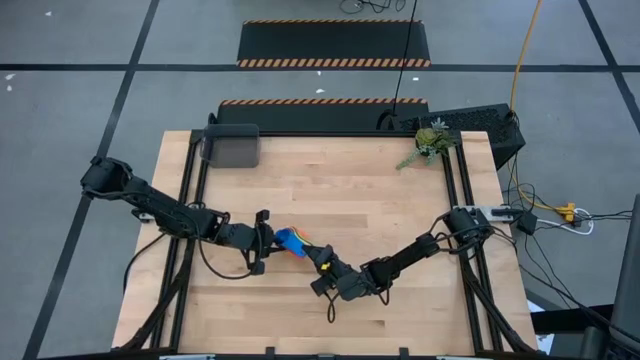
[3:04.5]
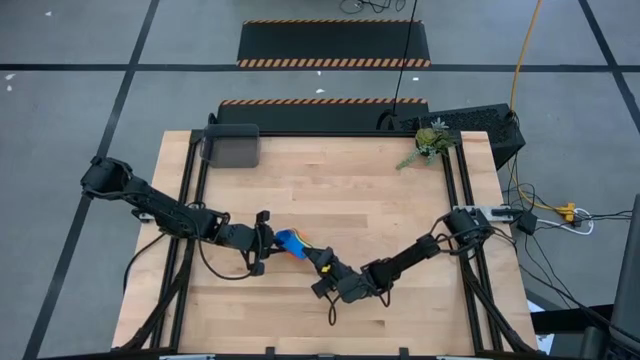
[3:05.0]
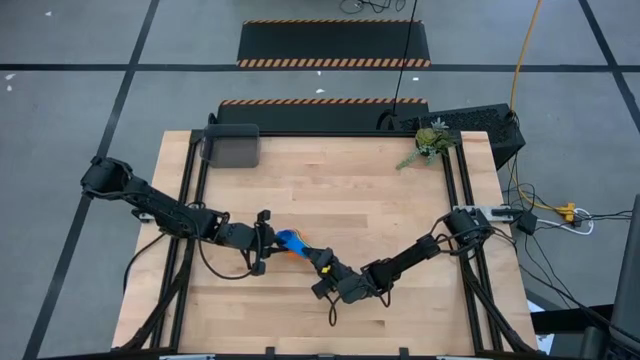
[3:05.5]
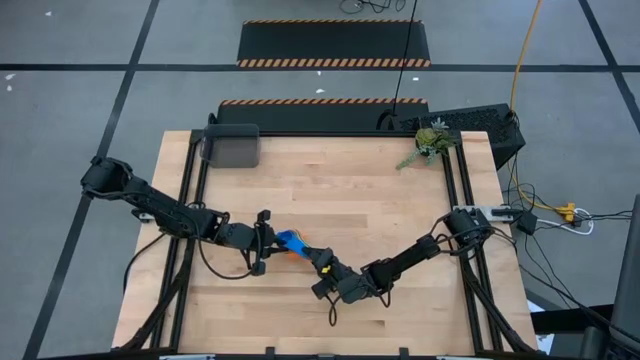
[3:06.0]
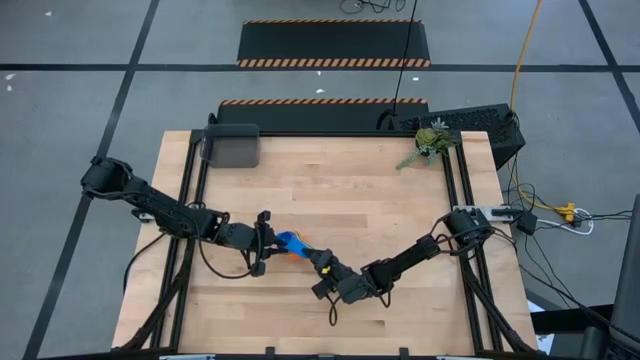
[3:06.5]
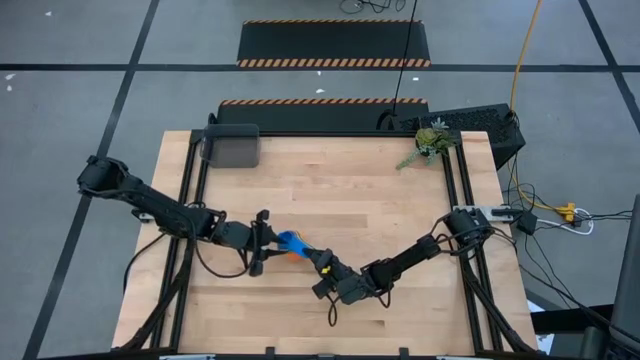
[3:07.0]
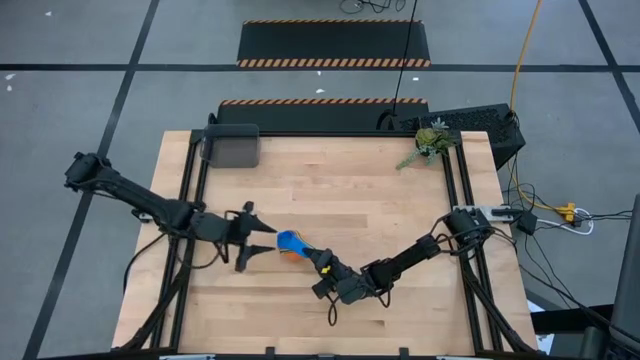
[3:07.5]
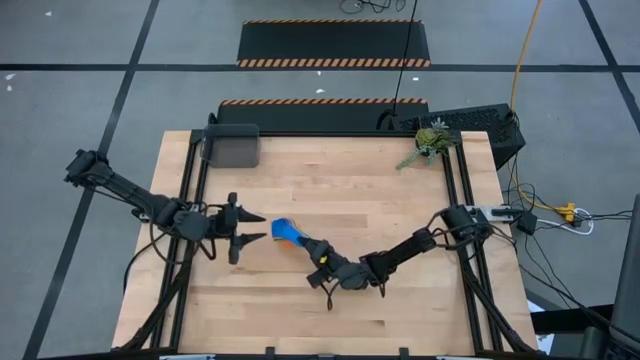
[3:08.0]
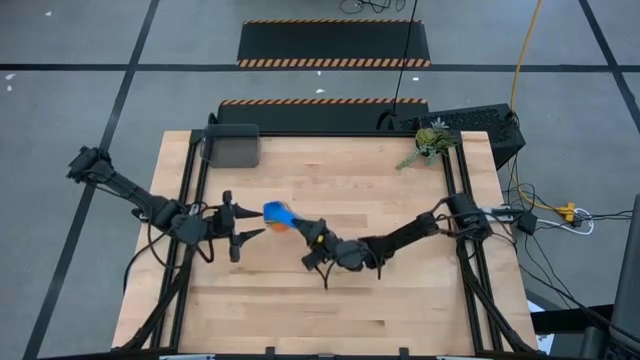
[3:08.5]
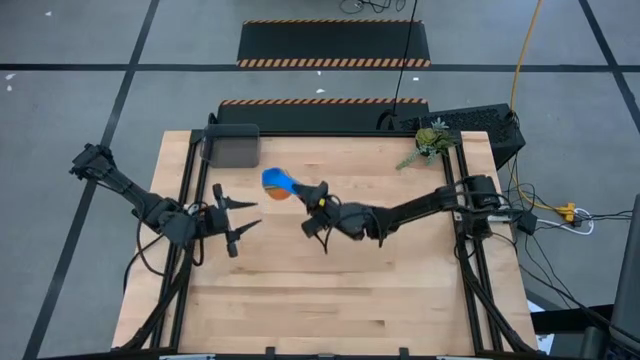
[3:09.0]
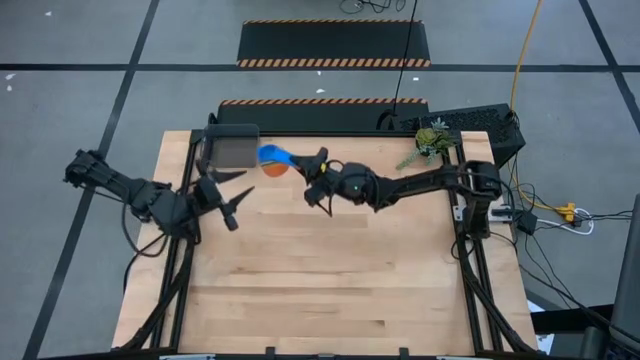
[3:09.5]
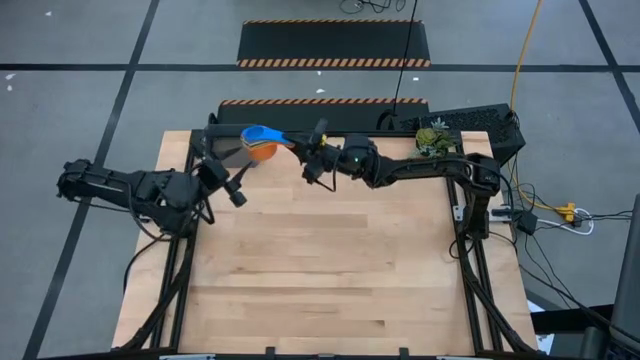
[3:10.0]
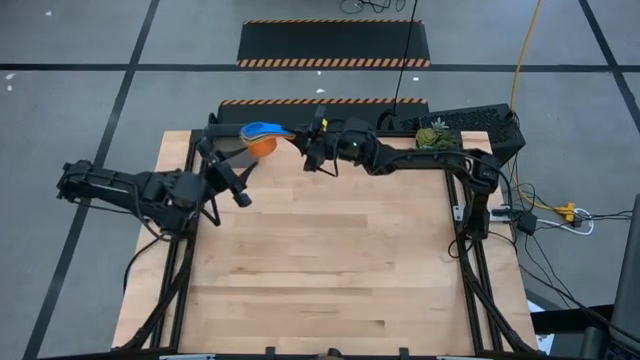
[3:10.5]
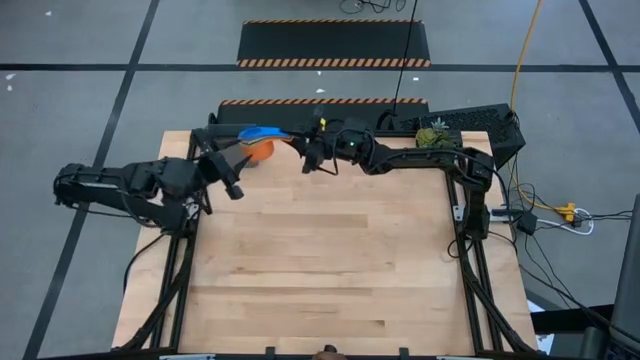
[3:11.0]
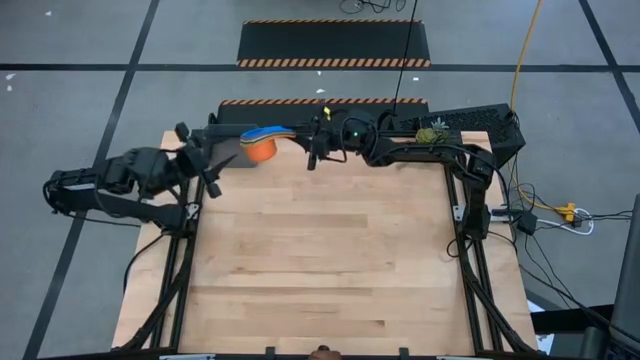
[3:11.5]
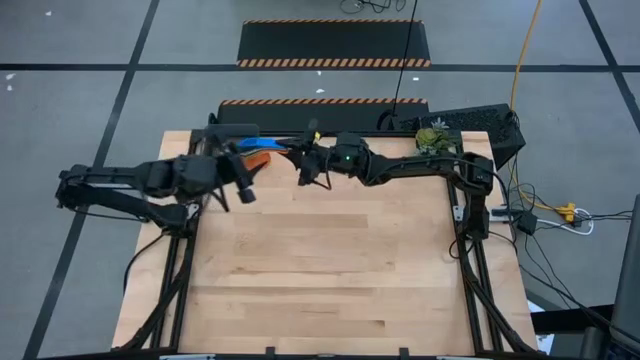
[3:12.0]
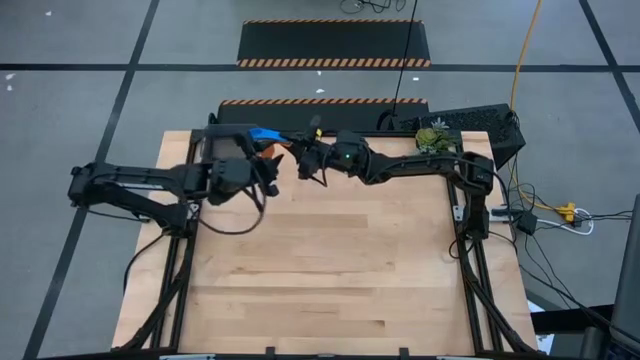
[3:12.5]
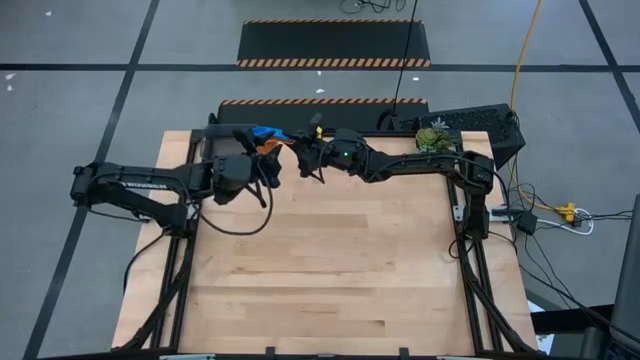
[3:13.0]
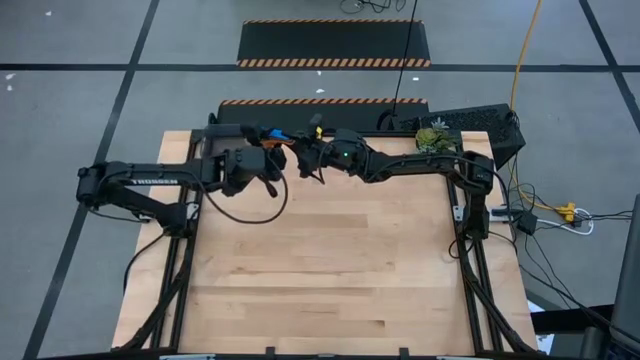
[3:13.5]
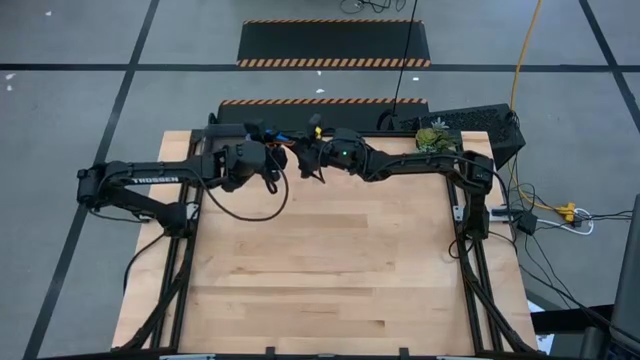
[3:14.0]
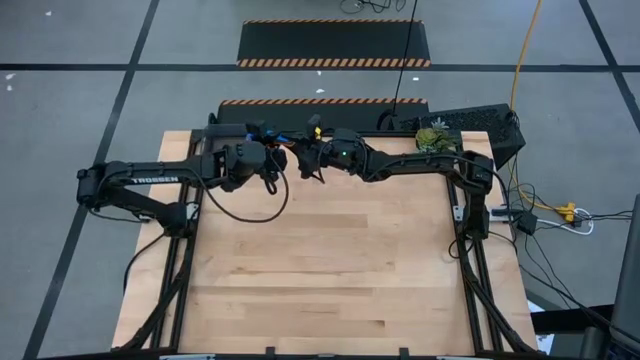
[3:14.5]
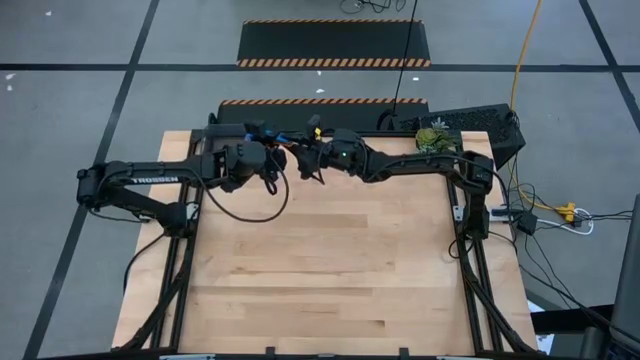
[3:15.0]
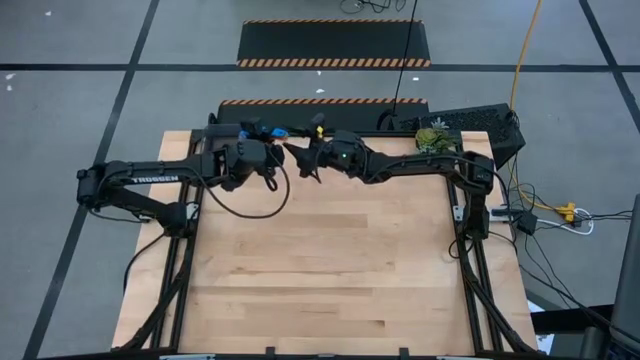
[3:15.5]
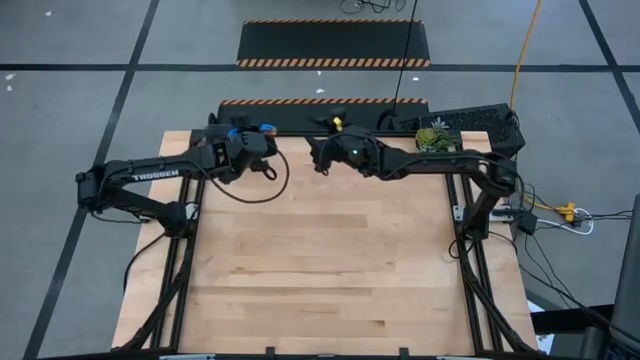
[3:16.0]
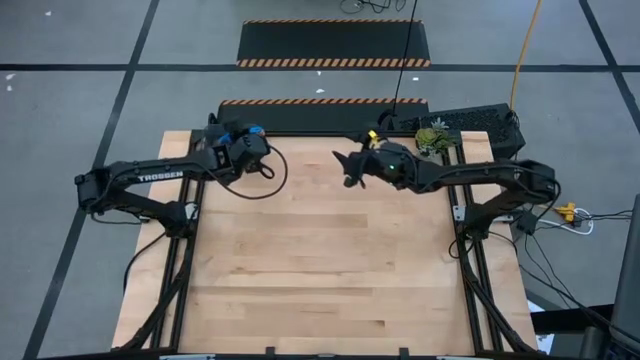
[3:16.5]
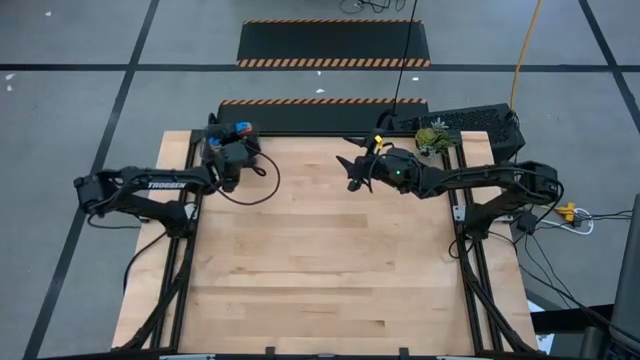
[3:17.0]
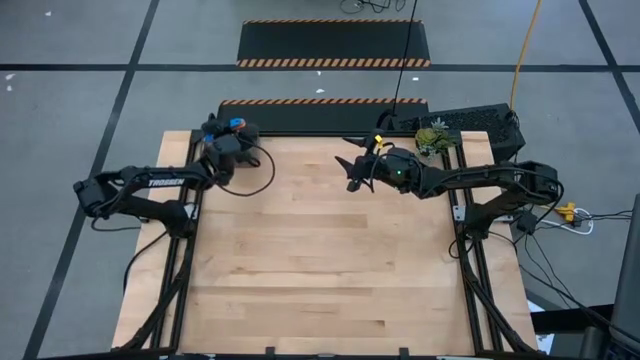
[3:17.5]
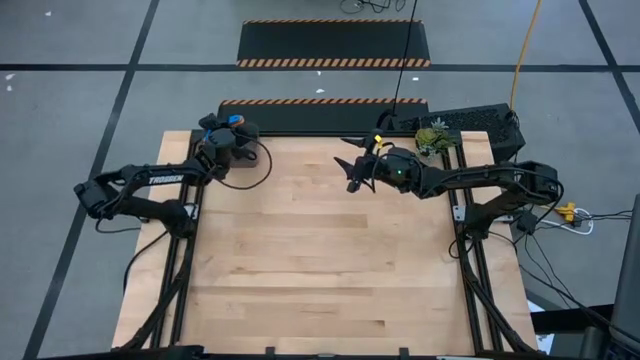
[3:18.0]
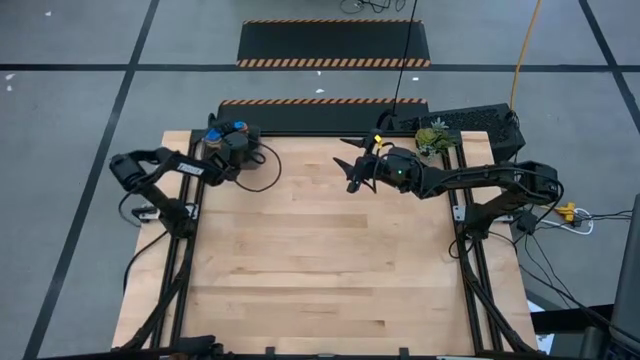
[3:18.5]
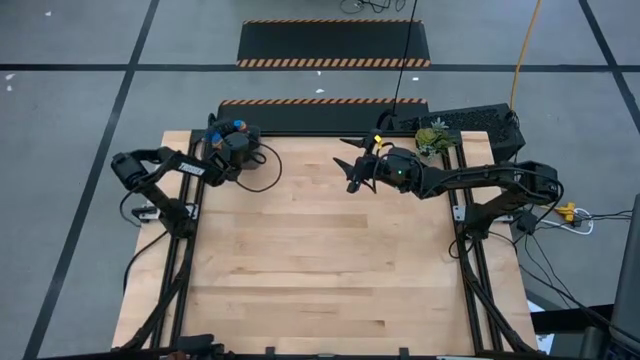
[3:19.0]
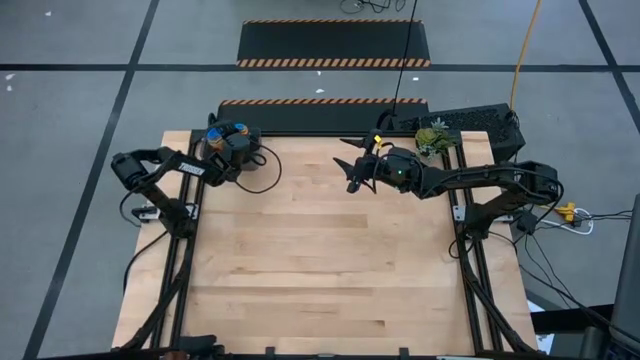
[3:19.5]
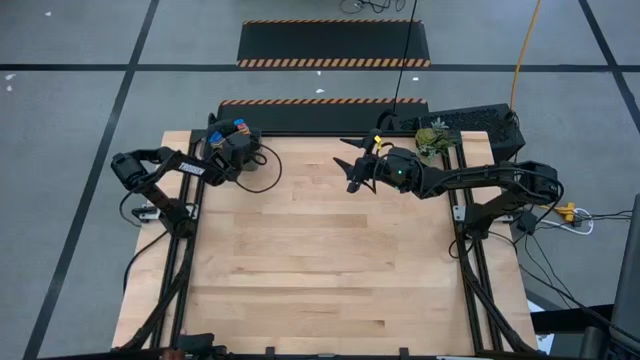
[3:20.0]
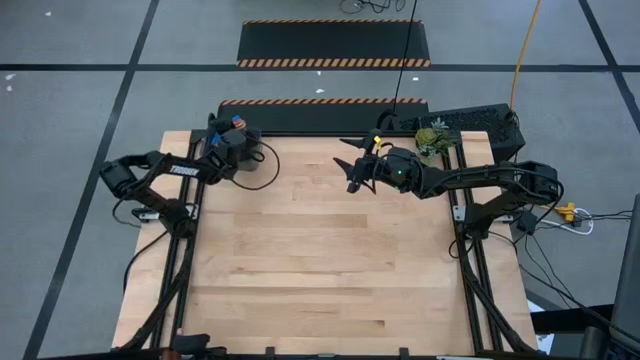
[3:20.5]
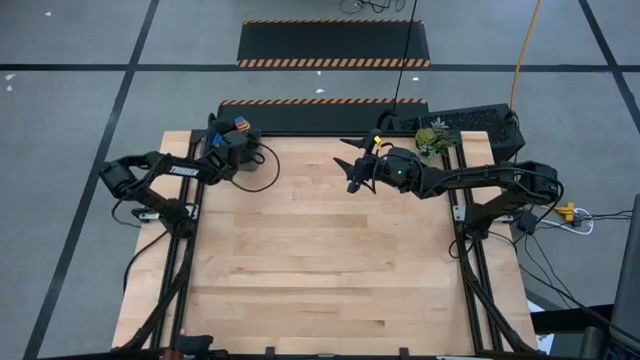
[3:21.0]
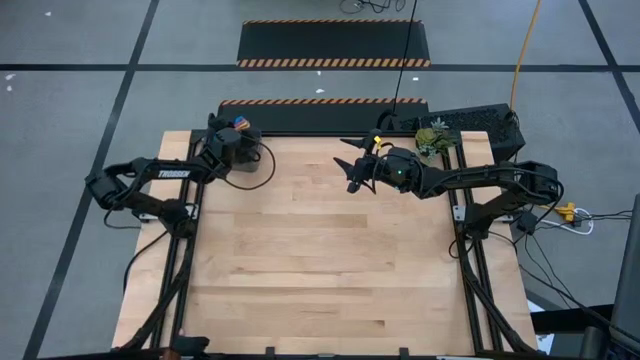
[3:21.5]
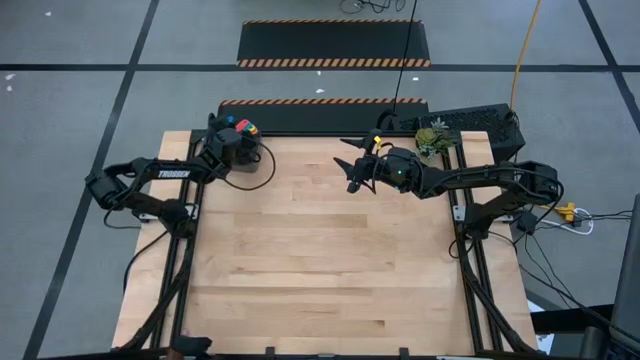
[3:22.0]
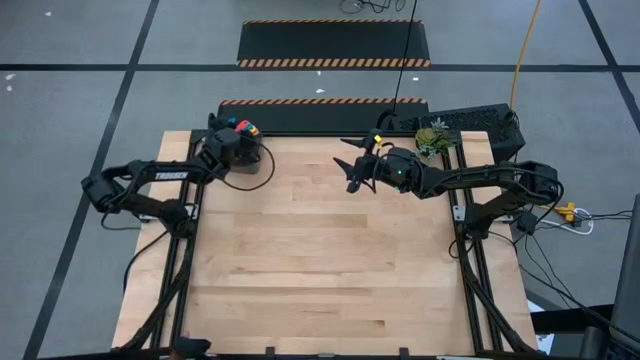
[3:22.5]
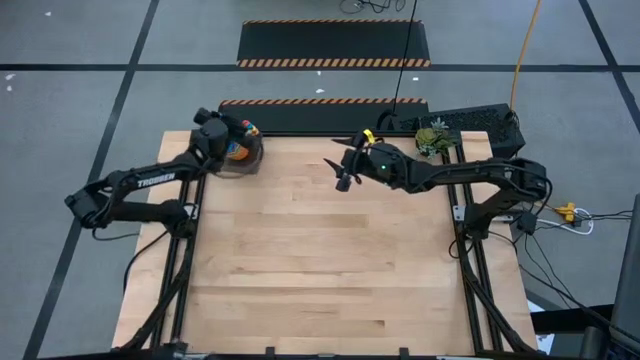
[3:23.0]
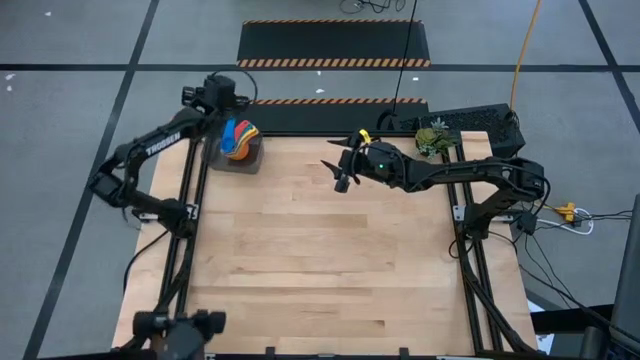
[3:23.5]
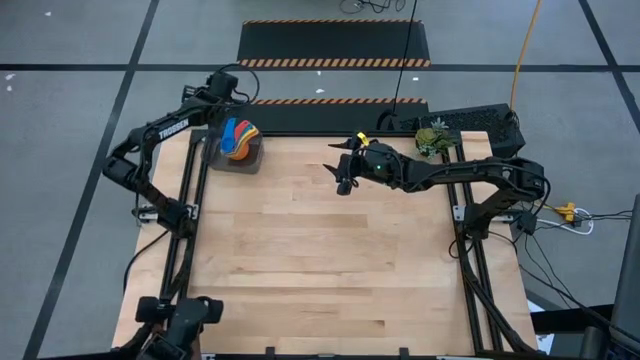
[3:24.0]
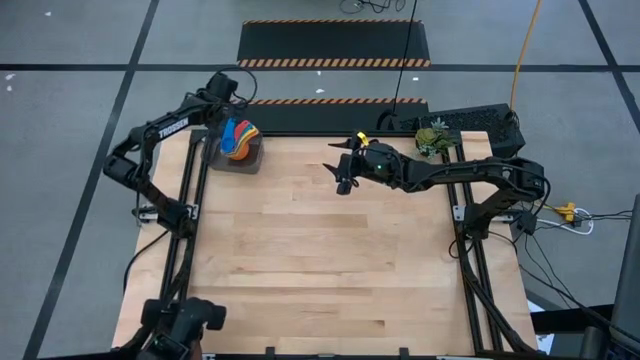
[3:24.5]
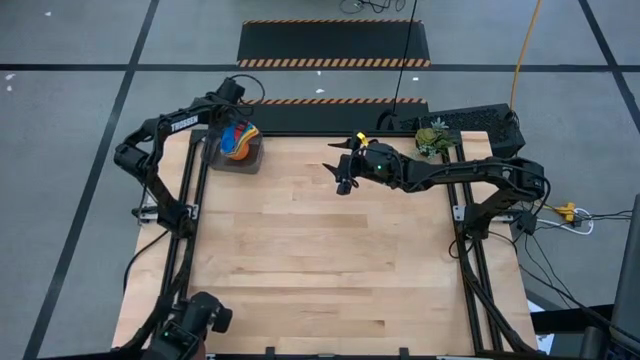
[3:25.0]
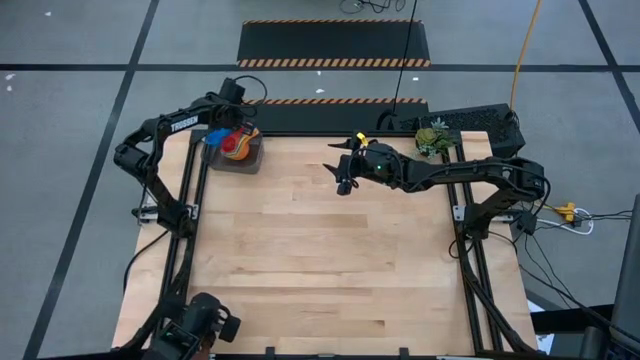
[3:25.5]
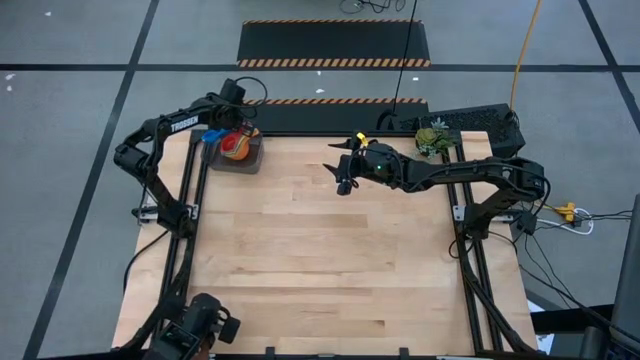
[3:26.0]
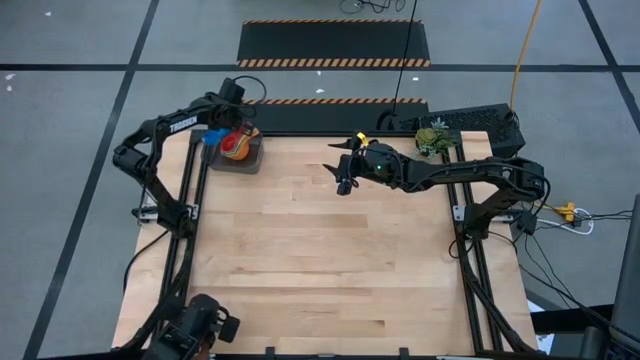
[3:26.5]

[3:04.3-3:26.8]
Task: Nest measuring cups in basket
Put the stacked measuring cups into the black bin
